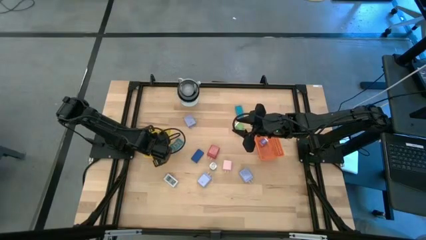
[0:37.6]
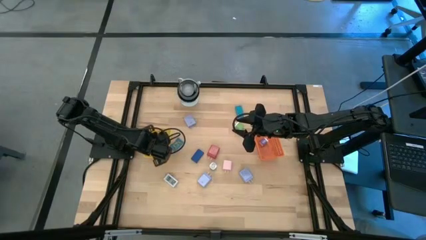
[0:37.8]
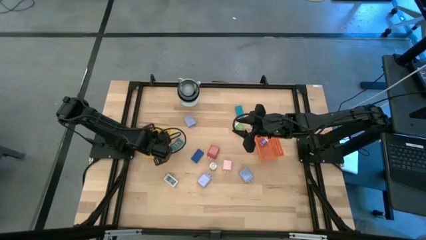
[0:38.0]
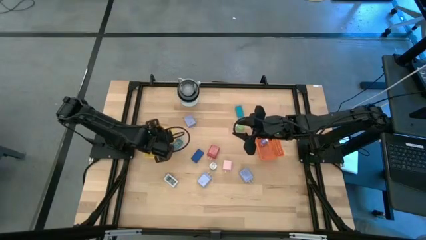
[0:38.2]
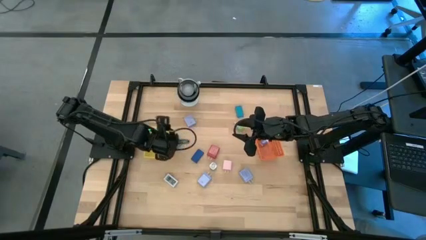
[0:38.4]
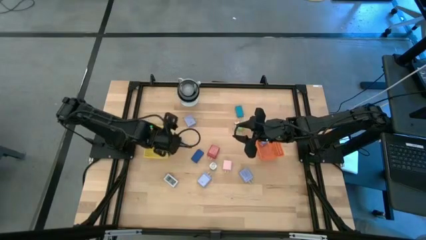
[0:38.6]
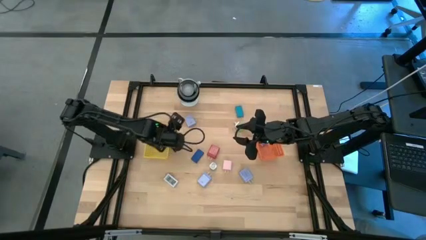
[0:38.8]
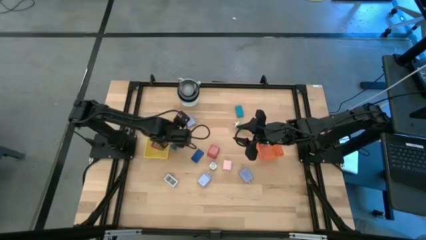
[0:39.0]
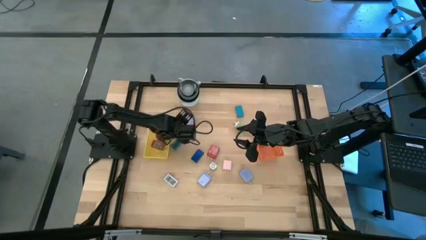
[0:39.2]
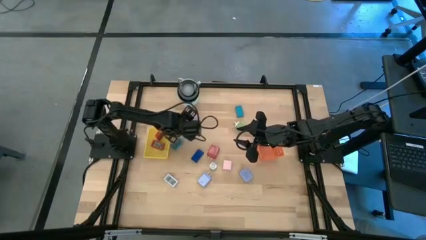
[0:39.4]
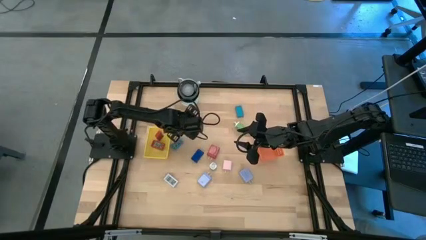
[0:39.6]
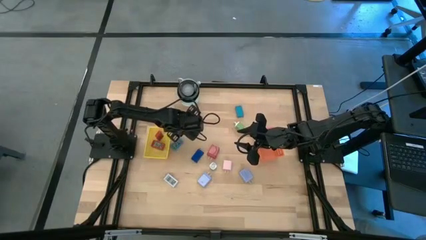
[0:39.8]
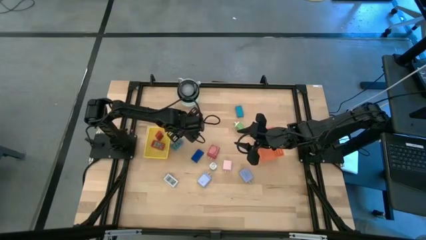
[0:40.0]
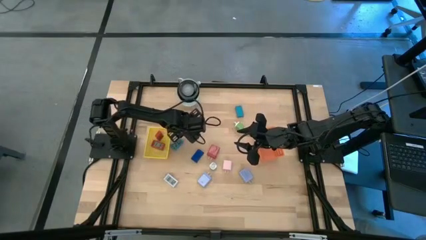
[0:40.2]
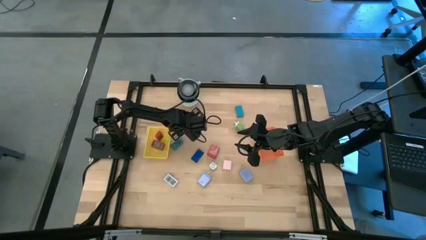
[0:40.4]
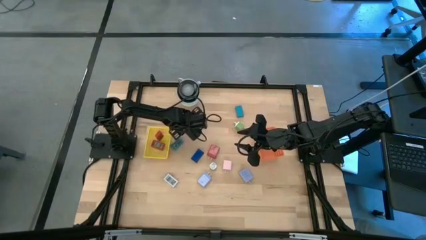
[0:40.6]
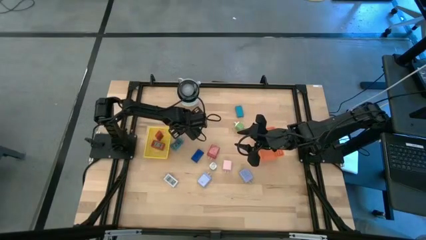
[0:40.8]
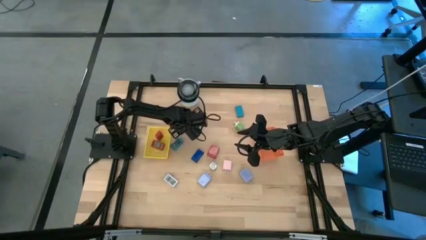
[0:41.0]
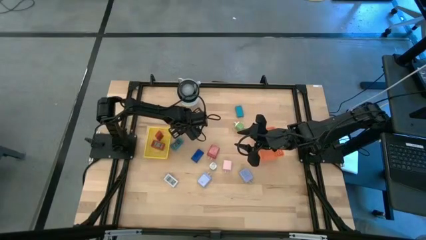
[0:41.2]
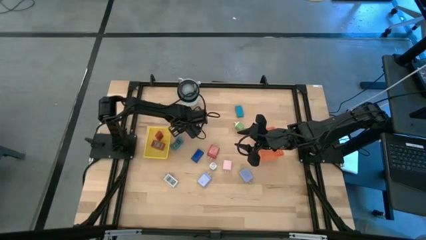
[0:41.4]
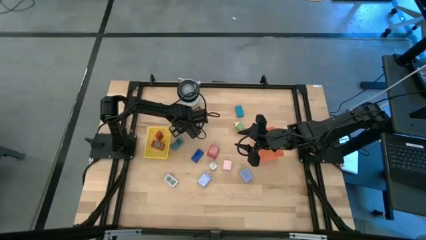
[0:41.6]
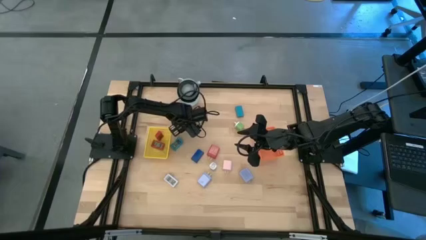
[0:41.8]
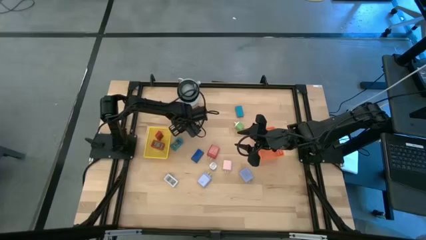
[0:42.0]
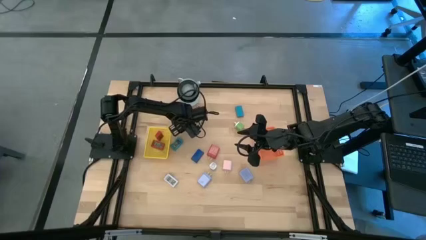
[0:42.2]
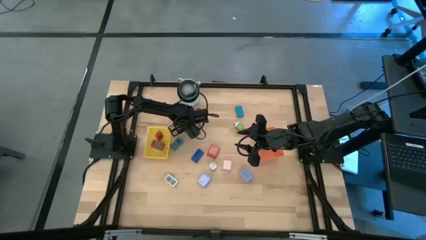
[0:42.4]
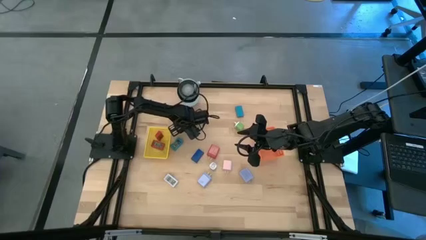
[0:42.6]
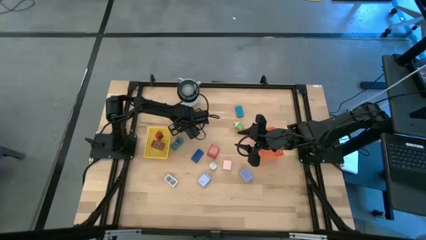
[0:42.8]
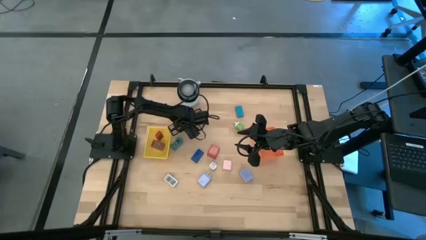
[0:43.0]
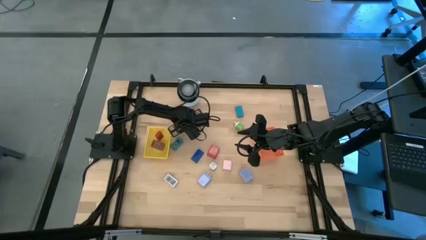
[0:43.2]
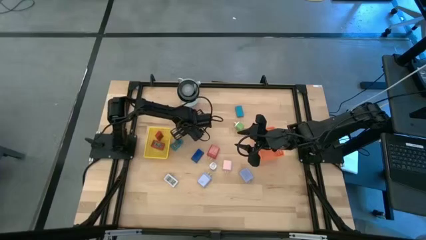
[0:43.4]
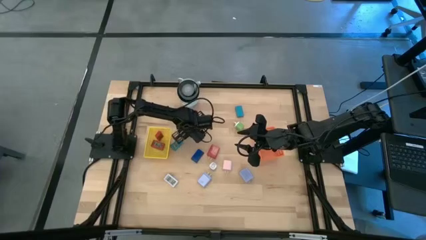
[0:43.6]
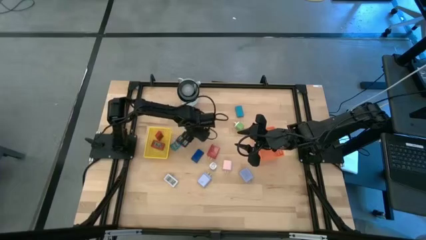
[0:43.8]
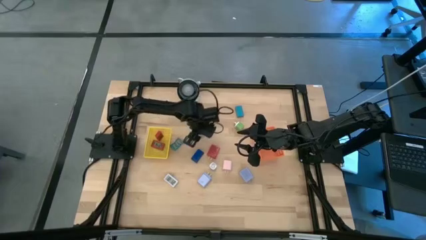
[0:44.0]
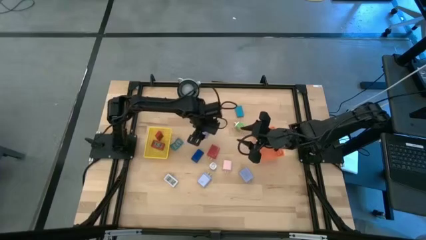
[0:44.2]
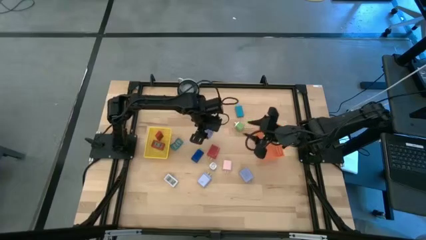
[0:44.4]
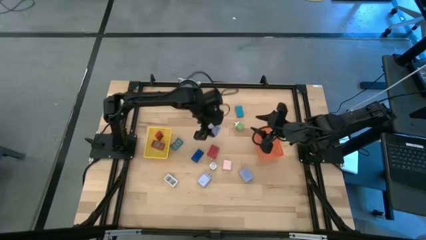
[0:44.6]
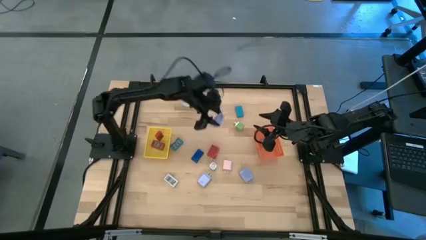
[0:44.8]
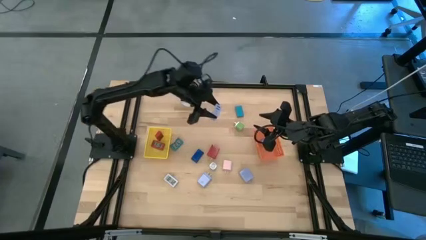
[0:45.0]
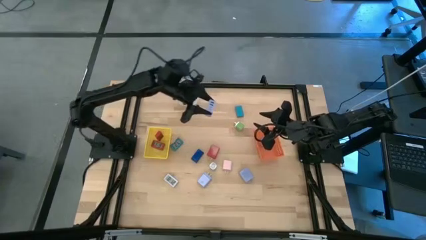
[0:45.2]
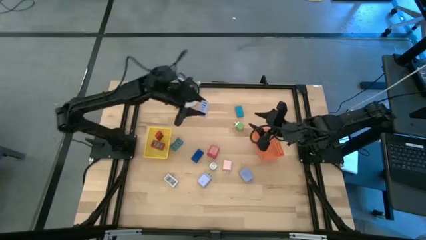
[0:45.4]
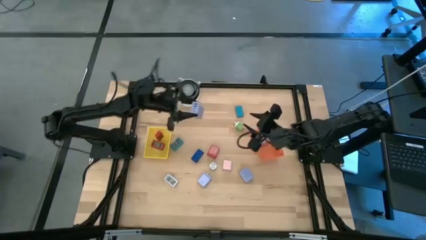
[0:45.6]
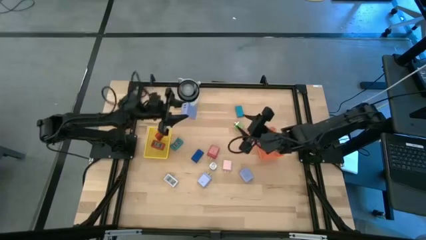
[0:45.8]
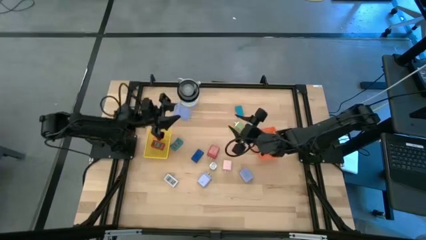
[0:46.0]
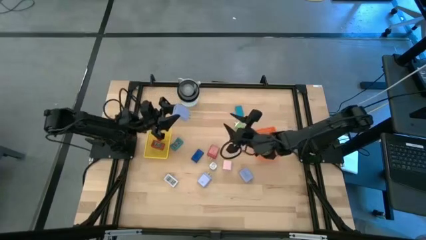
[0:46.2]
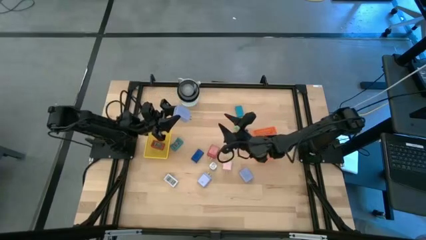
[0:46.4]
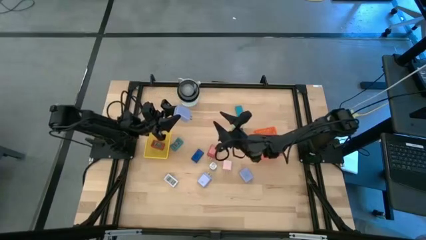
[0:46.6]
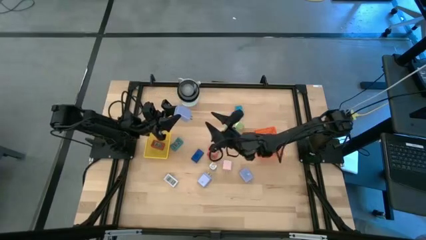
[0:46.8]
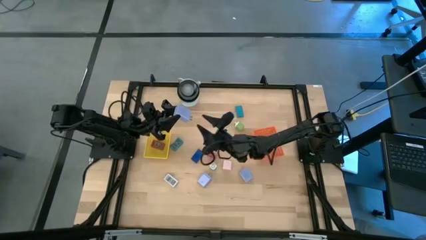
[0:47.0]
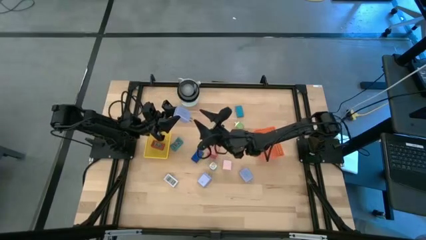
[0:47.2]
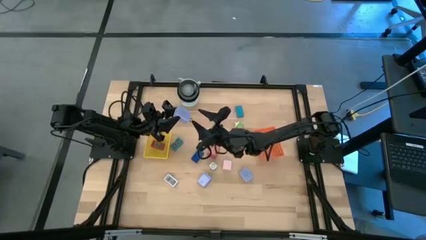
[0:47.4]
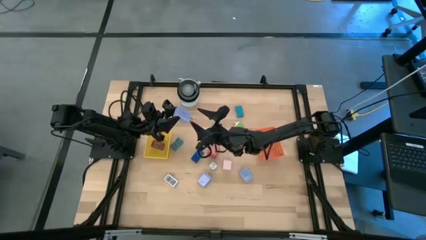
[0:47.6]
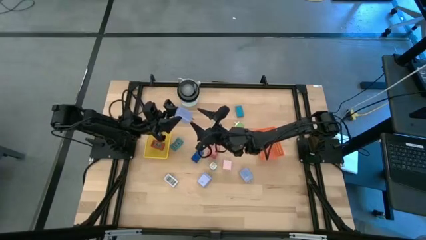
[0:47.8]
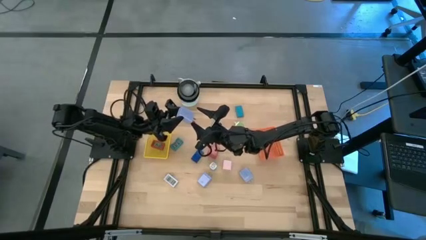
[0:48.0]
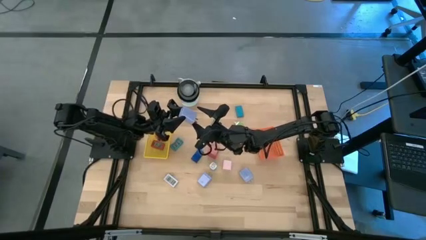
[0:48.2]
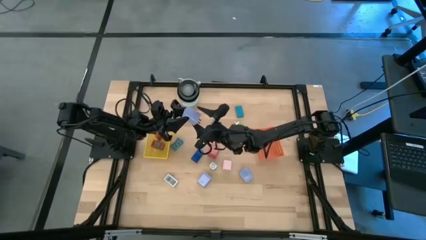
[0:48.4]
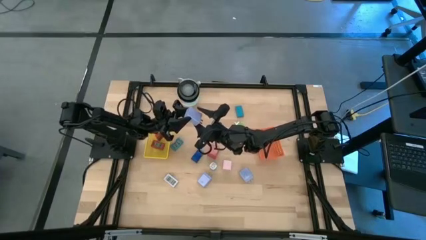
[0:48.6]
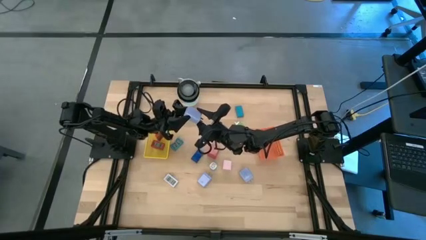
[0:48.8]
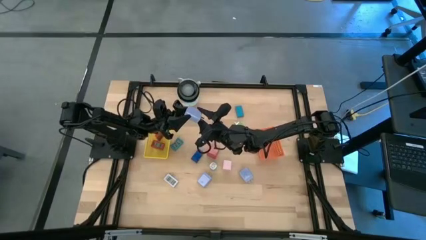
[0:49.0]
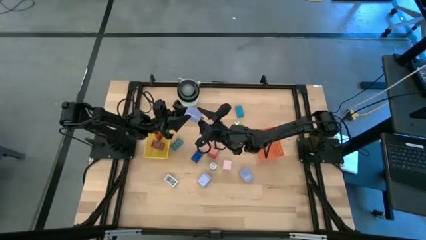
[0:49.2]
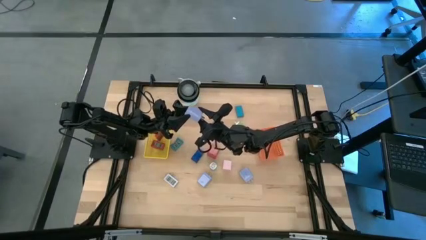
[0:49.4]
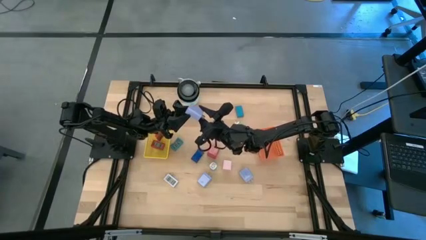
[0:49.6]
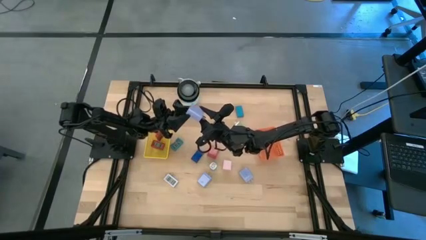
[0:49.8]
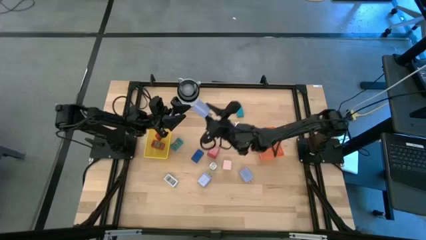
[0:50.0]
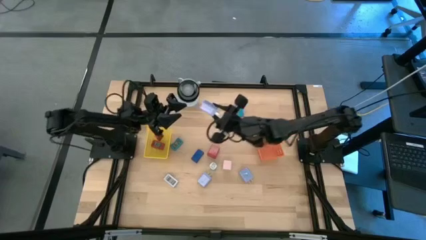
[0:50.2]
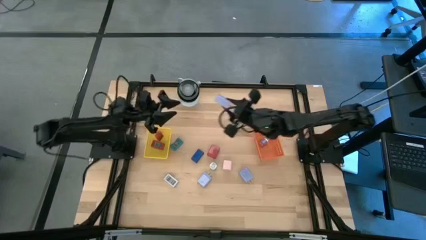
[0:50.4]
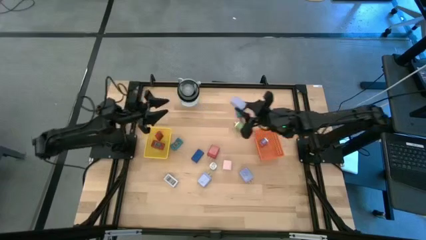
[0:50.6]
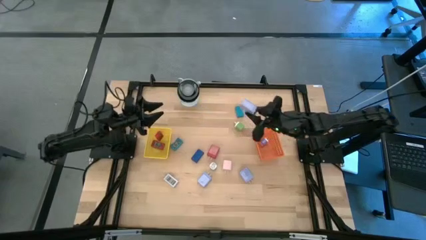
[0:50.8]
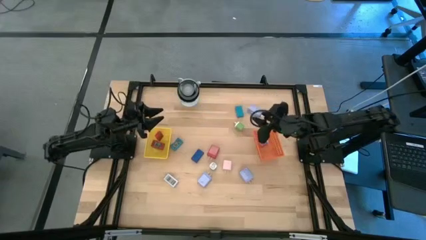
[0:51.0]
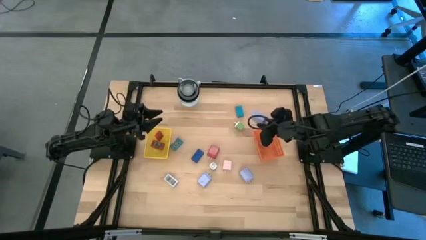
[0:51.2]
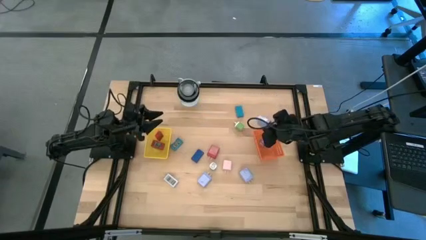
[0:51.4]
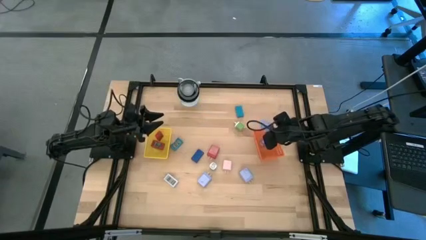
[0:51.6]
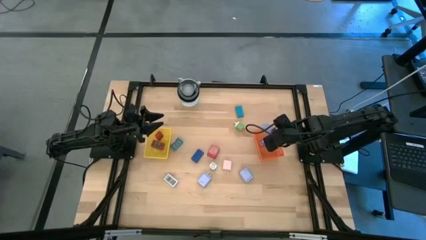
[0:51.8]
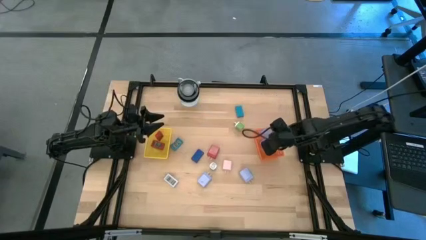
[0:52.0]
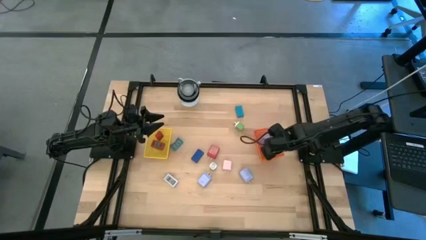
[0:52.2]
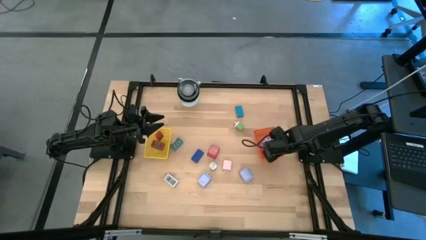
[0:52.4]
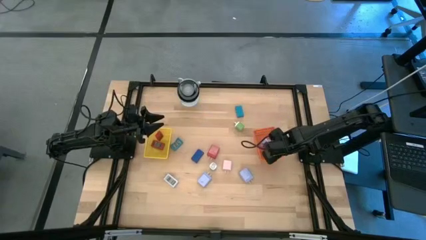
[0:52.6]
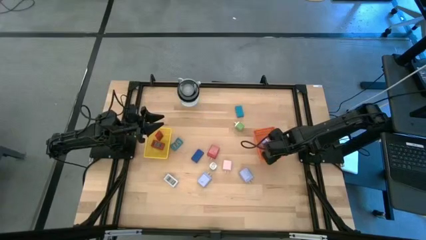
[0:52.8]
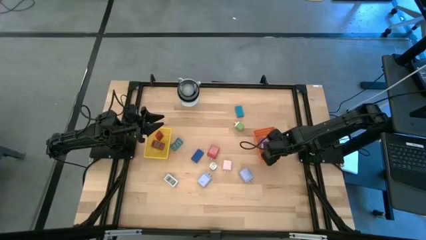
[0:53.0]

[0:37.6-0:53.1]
Task: Pick & Place Office items
Put the top light purple charger adapter into the orange basket
